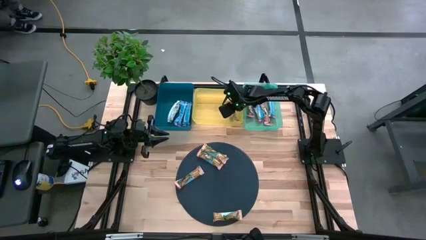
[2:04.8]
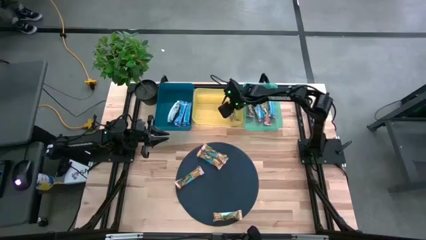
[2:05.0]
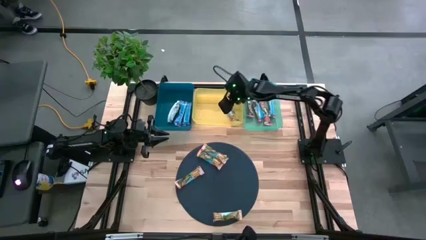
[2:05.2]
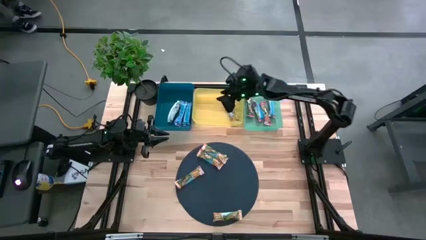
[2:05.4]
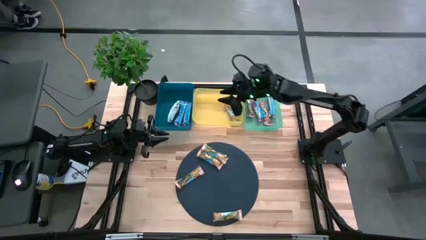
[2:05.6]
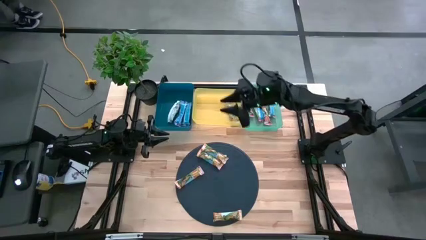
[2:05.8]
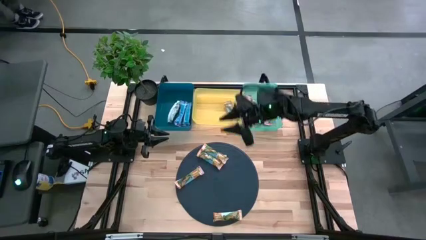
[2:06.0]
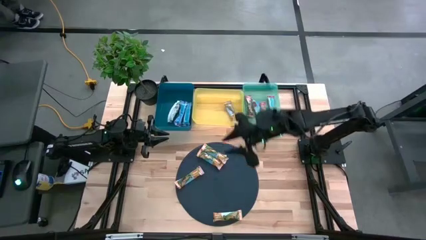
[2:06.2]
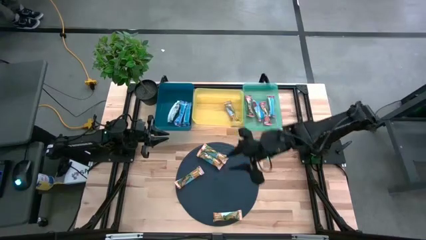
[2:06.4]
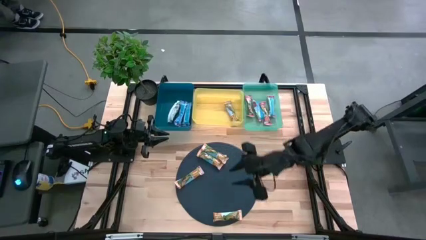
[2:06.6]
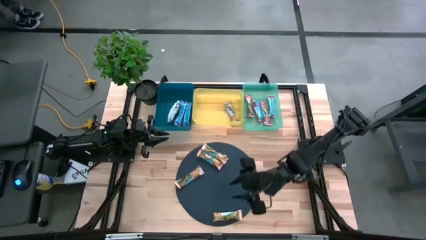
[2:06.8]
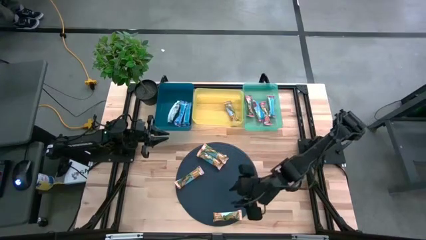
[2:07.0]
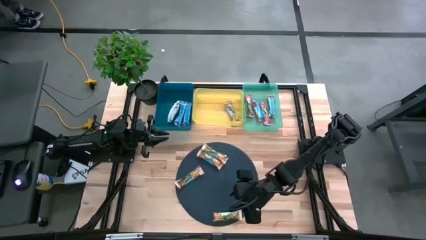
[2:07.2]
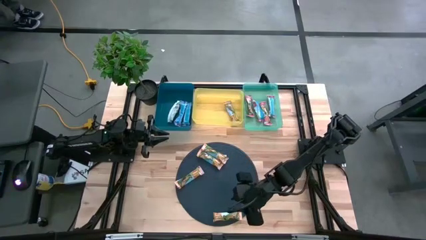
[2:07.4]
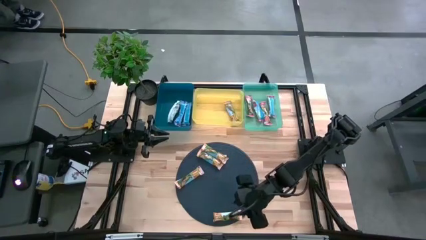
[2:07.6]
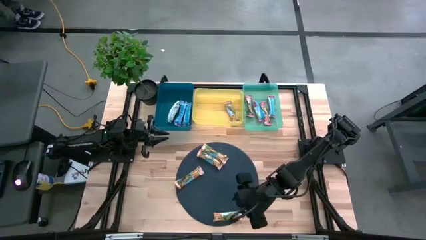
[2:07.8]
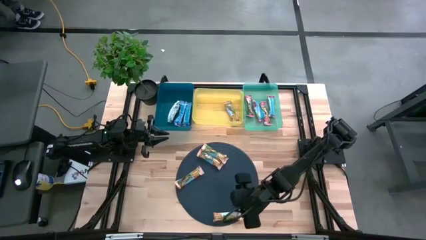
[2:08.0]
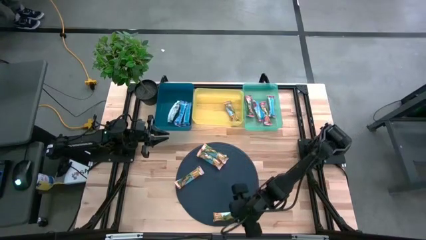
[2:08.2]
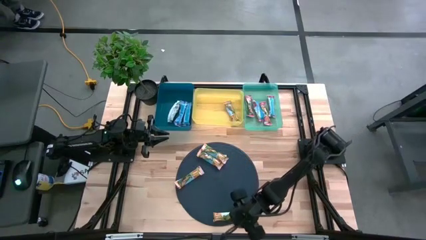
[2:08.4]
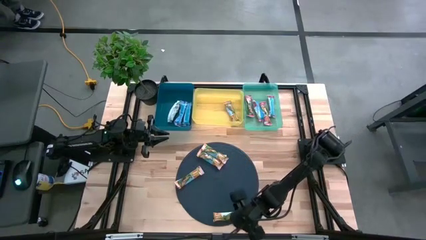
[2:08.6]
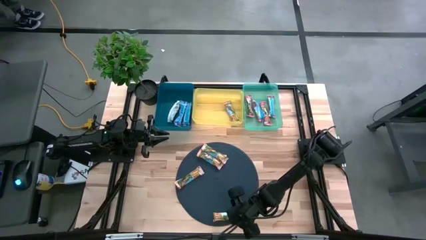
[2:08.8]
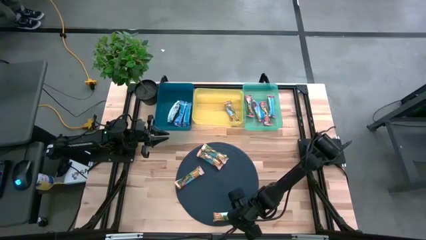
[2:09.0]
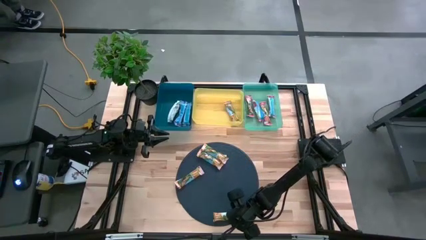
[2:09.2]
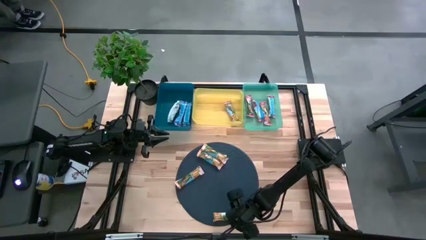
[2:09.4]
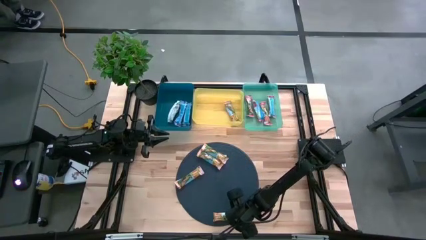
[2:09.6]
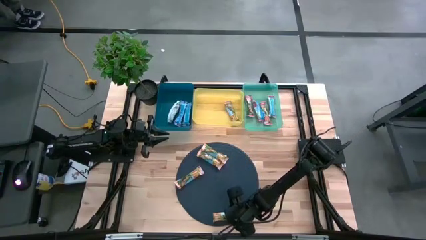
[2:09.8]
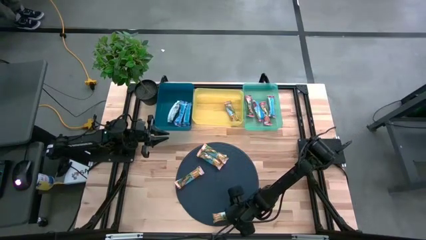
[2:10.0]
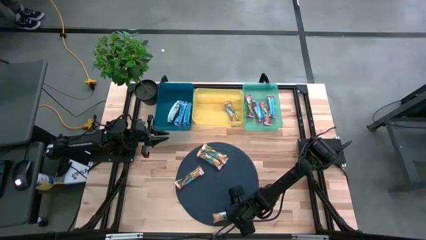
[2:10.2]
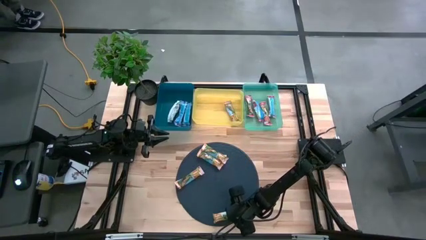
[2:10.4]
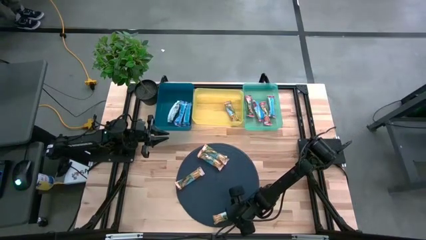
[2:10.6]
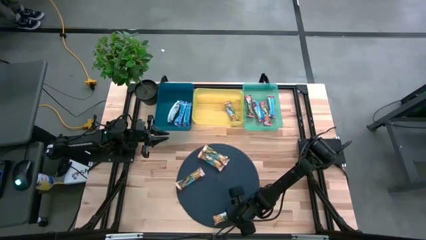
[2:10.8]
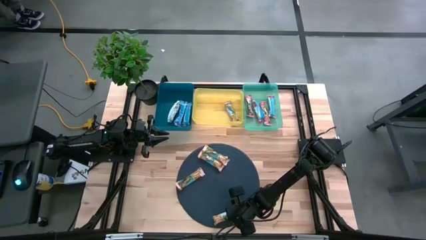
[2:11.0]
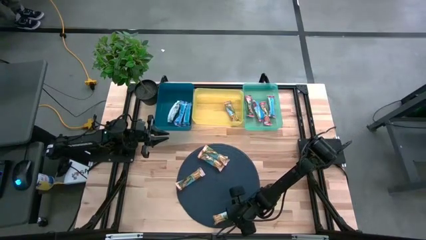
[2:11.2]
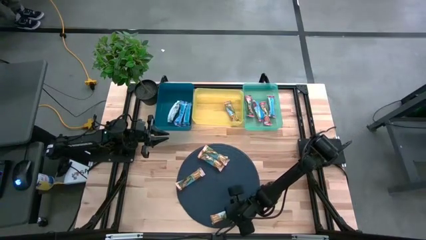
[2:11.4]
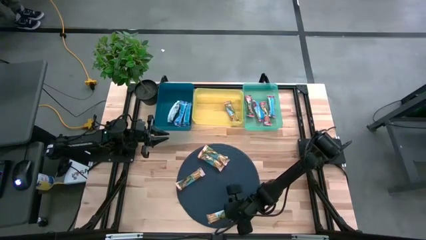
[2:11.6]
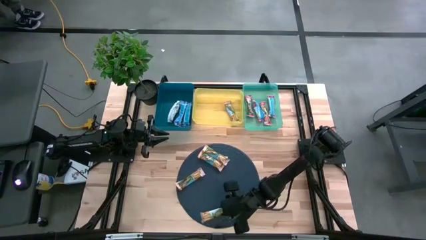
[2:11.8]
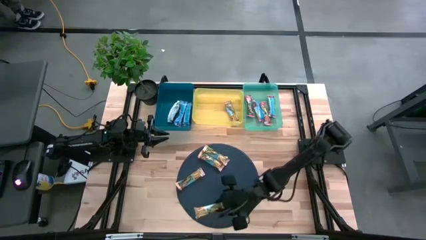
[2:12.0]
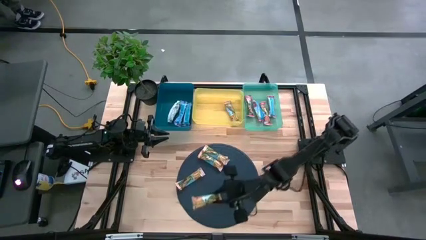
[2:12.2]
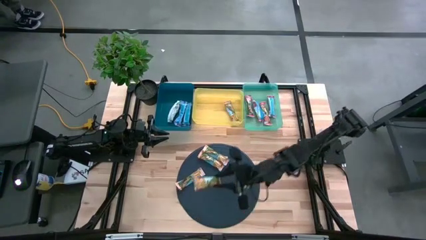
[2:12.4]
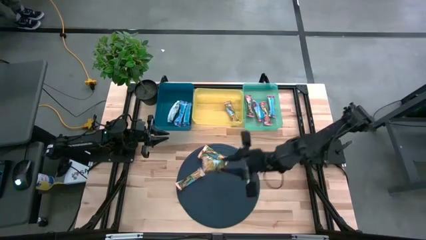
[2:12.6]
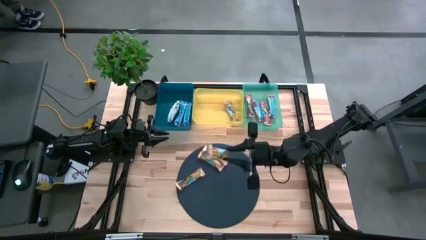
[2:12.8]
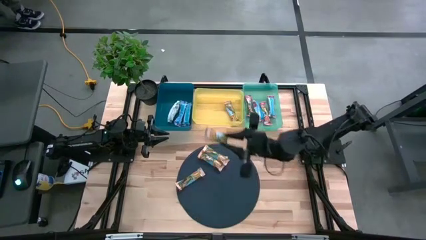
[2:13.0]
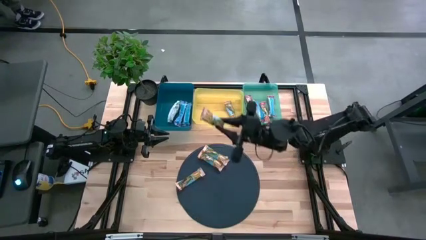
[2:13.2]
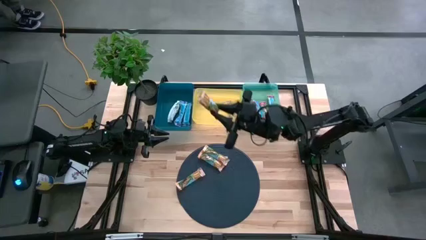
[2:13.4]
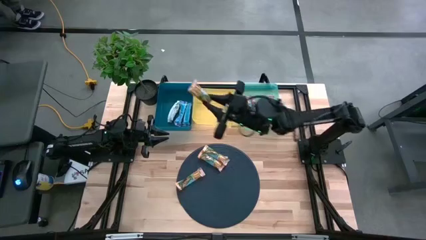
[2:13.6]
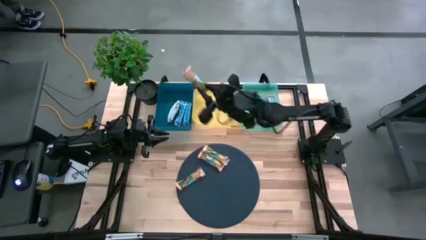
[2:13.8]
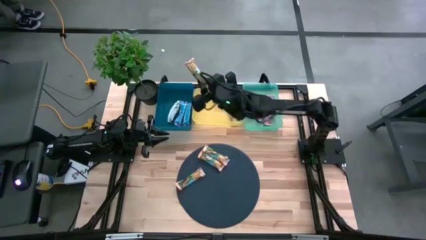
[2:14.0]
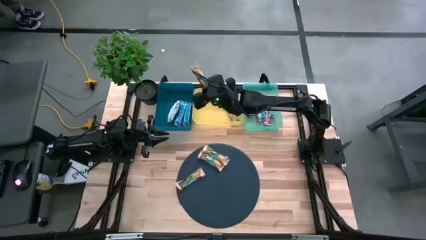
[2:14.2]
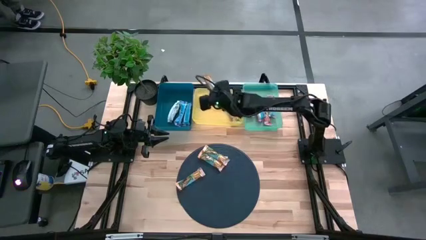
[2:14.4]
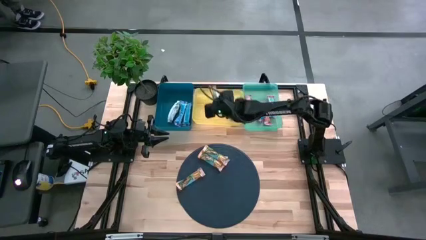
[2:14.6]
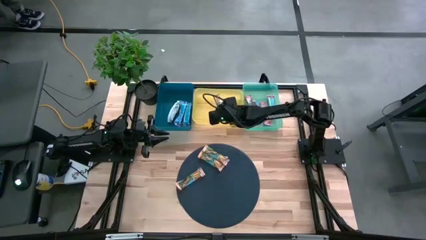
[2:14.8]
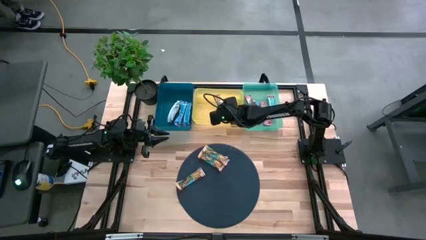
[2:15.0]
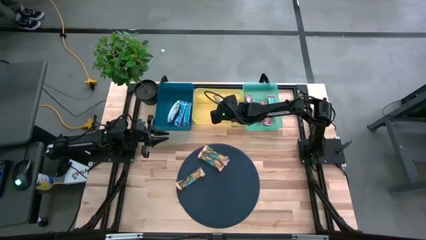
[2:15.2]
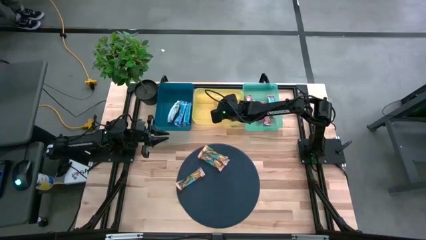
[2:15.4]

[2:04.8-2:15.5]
Task: Pick and place Granola Bars by type
Put the yellow granola bar into the yellow bin

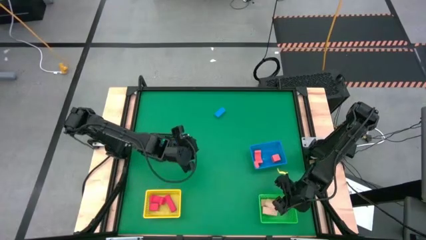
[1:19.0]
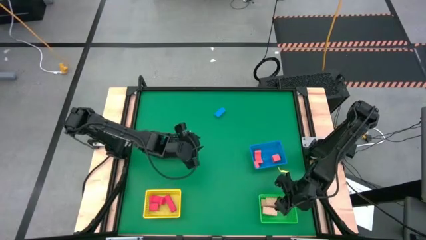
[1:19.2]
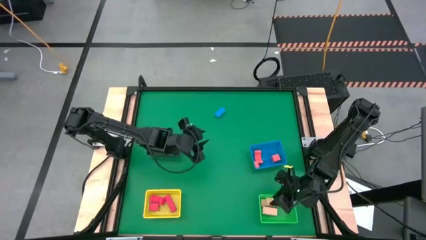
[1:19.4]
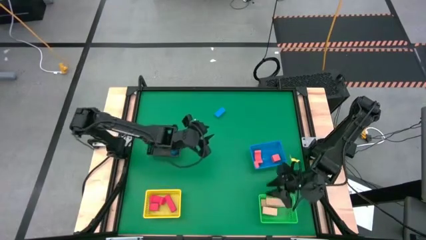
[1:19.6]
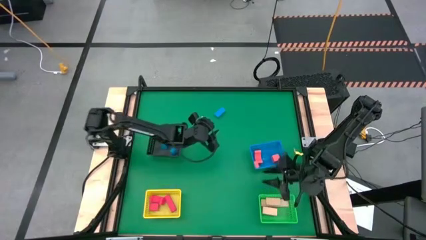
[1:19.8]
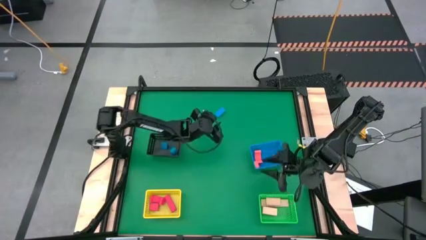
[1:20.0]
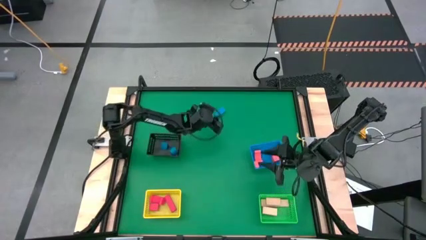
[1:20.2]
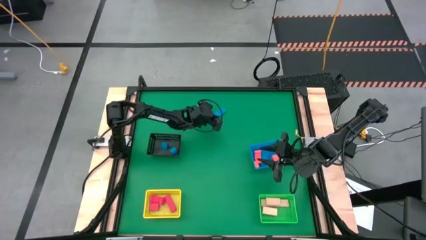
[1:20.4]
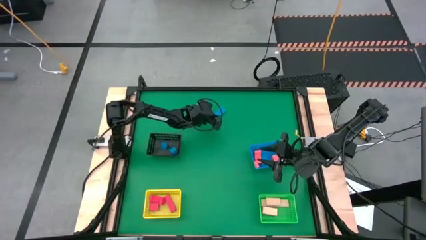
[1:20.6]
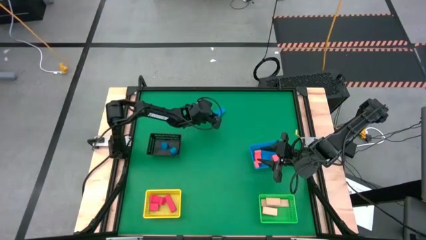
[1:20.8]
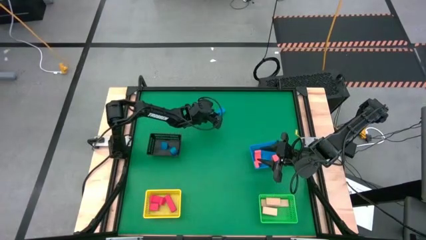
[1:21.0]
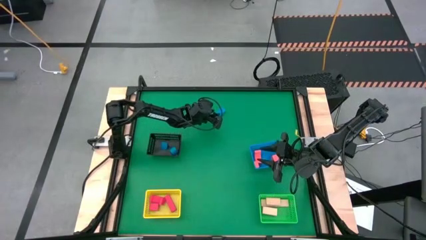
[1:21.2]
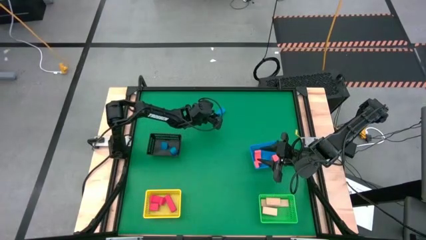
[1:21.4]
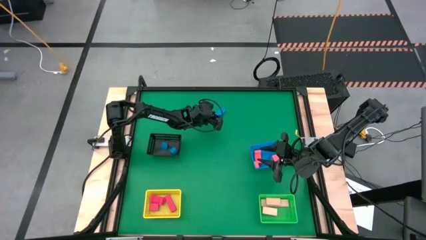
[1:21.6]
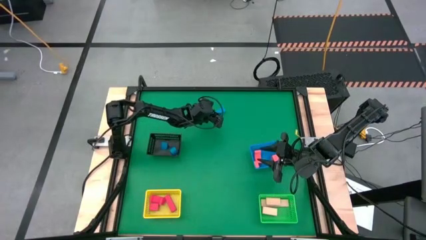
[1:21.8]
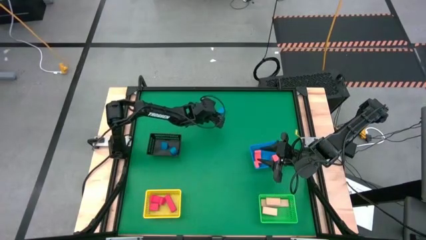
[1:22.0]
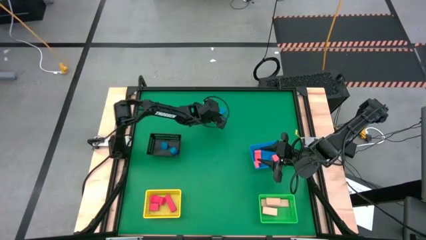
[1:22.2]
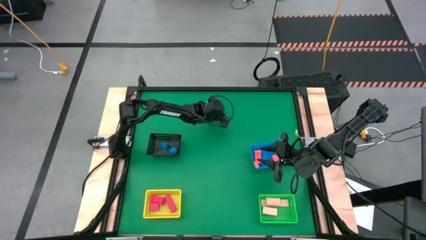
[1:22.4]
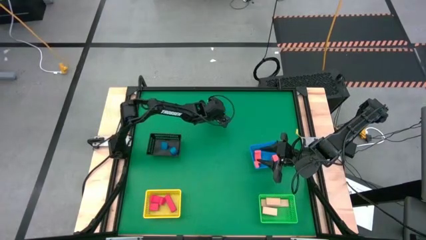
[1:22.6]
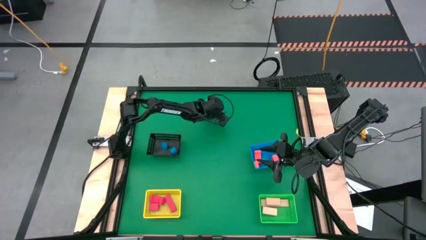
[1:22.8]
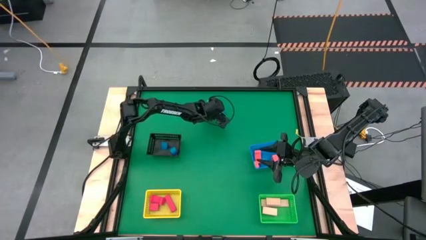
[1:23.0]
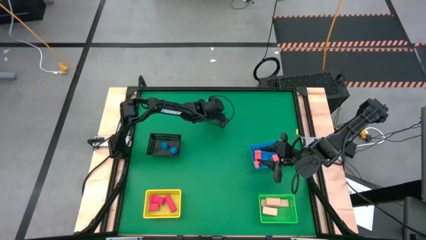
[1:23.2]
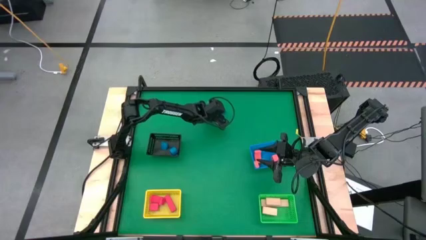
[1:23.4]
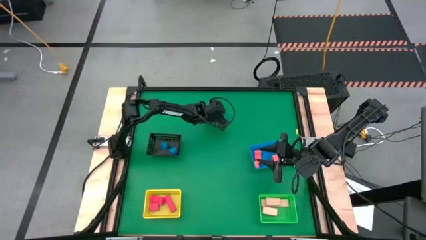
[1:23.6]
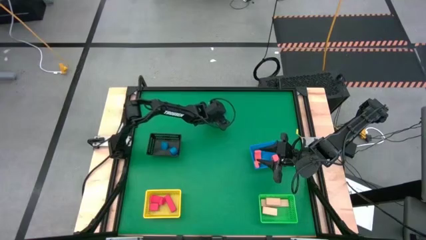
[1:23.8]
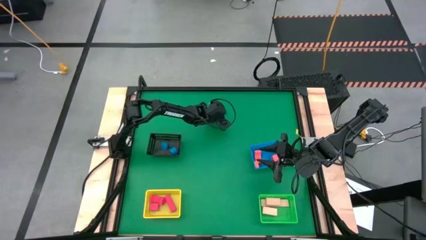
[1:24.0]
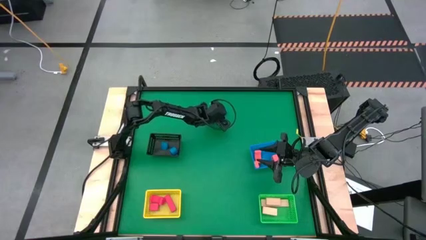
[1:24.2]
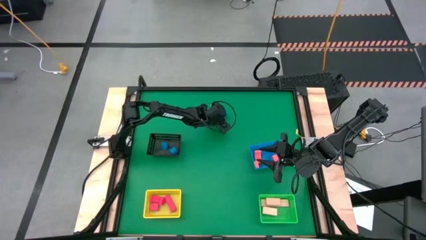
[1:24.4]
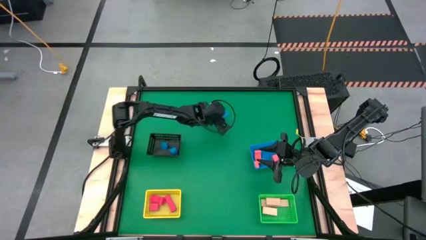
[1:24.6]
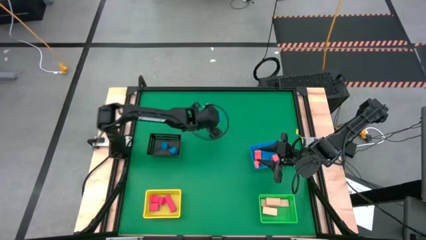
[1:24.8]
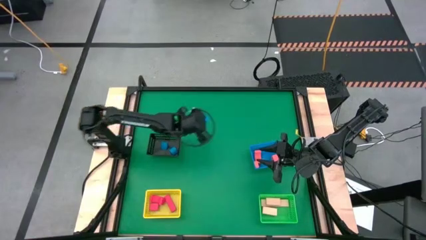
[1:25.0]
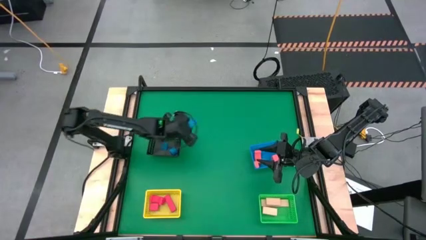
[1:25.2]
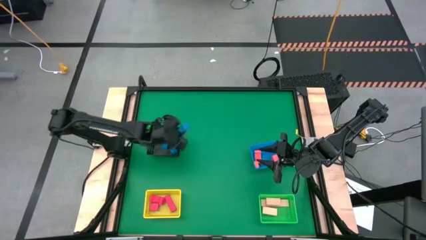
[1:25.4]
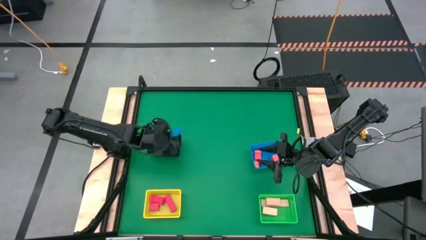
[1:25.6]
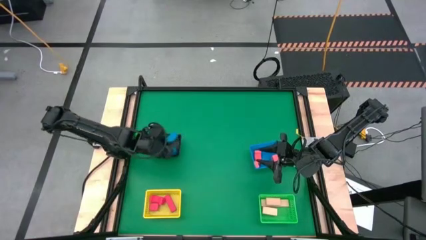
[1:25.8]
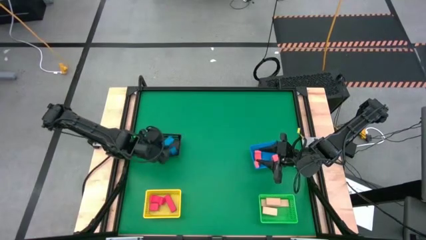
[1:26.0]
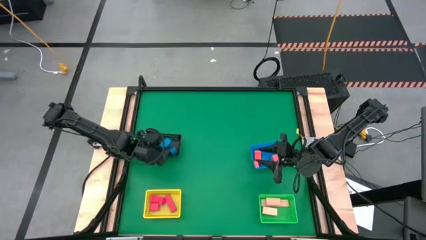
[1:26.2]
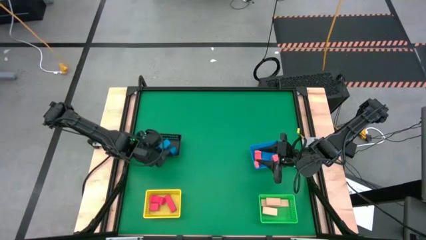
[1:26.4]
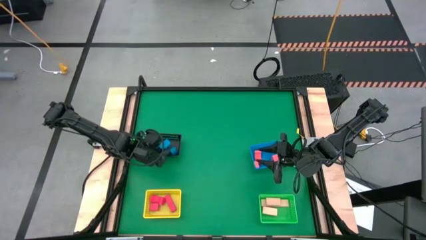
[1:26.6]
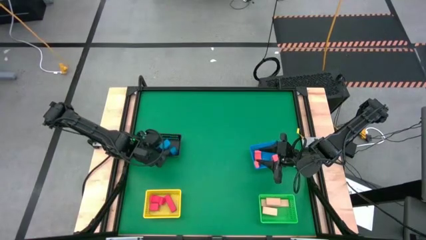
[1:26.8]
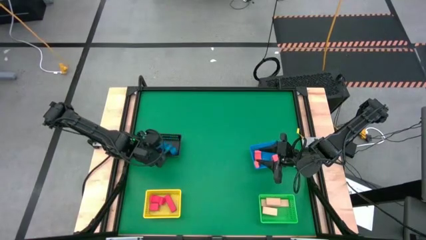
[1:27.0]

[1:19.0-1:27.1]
Task: Sort & place blocks by color
Put the blue block into the black bin
